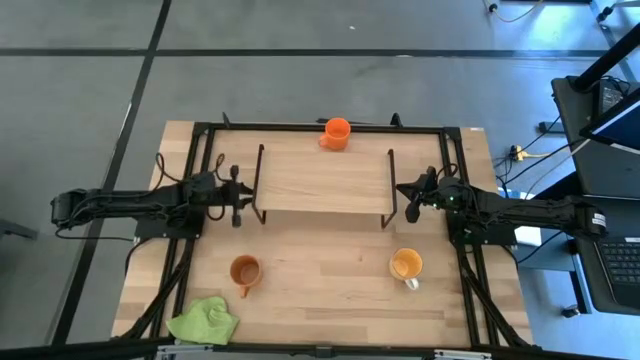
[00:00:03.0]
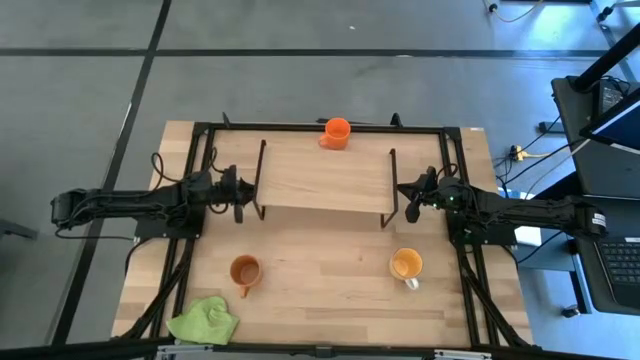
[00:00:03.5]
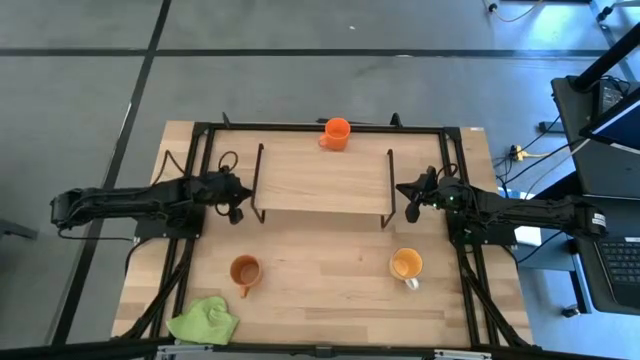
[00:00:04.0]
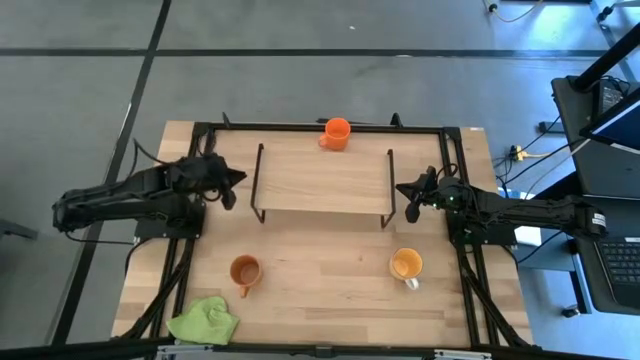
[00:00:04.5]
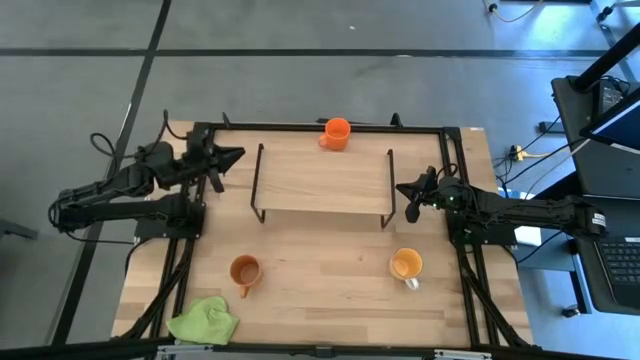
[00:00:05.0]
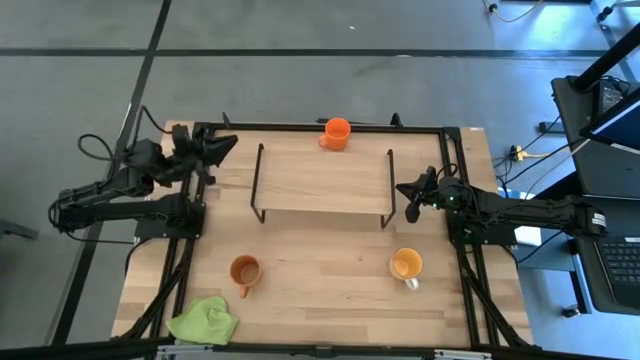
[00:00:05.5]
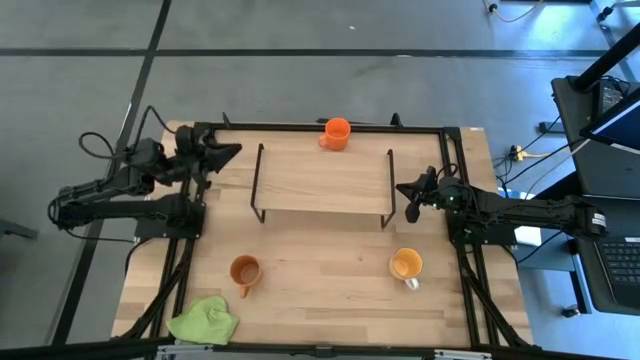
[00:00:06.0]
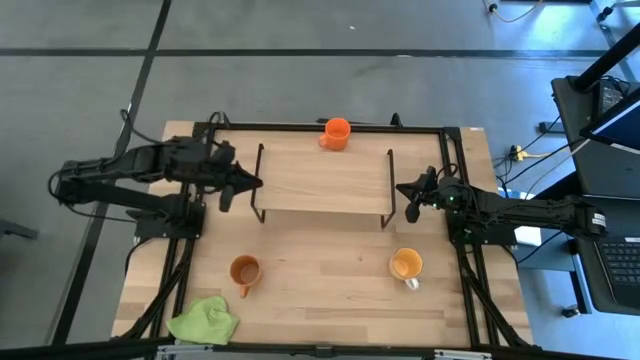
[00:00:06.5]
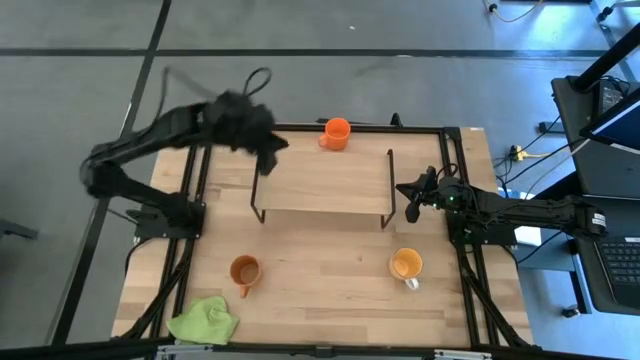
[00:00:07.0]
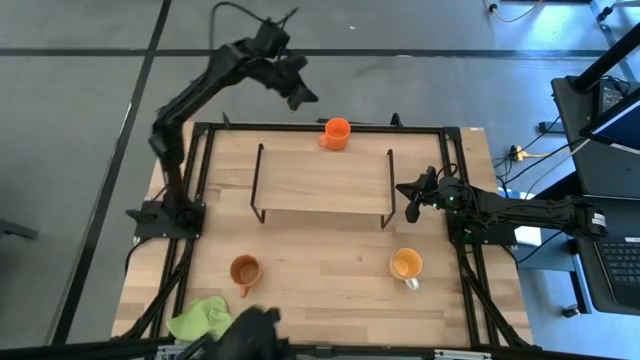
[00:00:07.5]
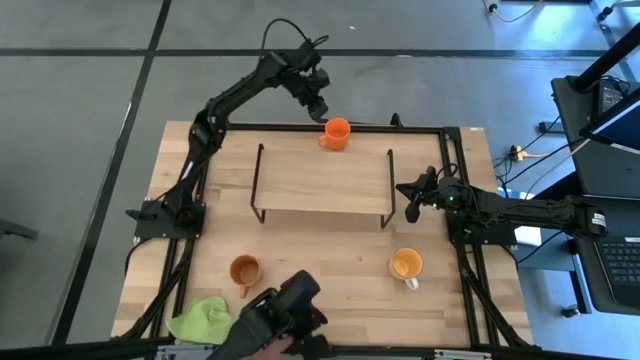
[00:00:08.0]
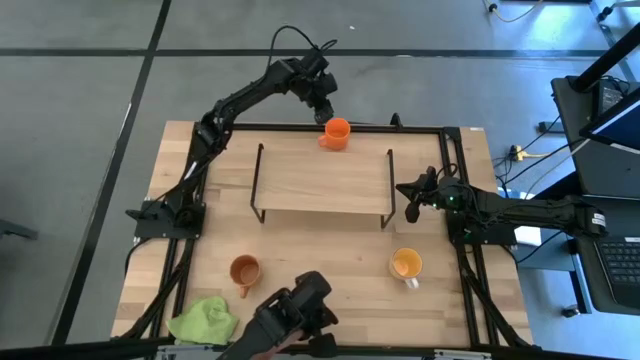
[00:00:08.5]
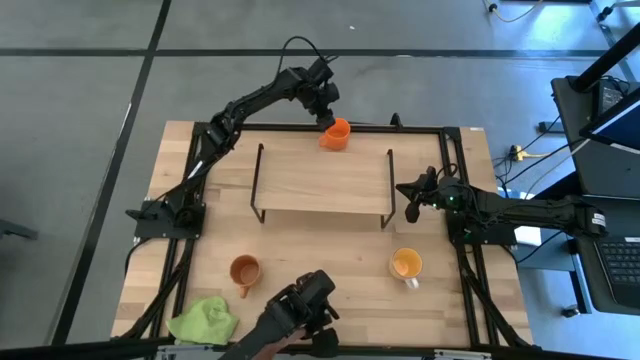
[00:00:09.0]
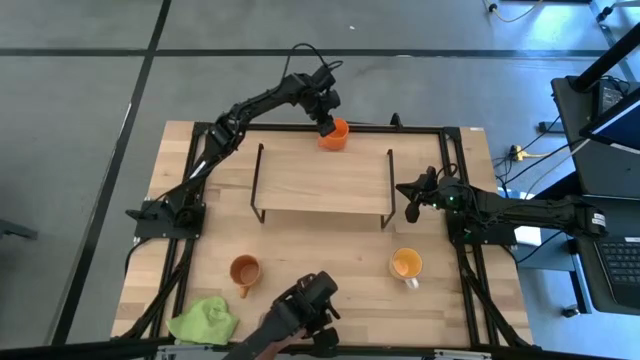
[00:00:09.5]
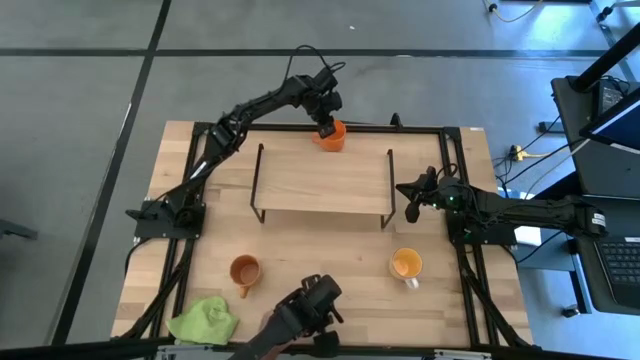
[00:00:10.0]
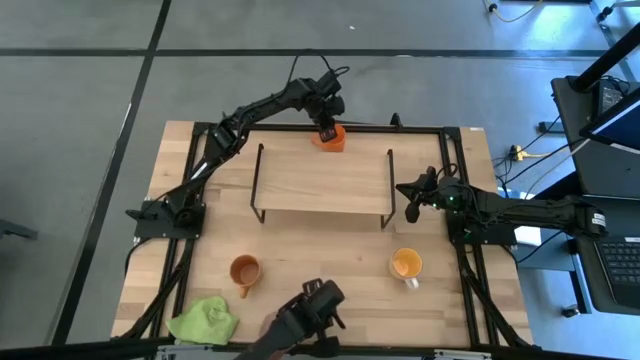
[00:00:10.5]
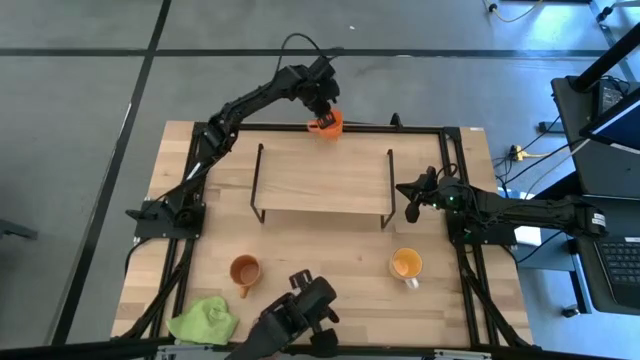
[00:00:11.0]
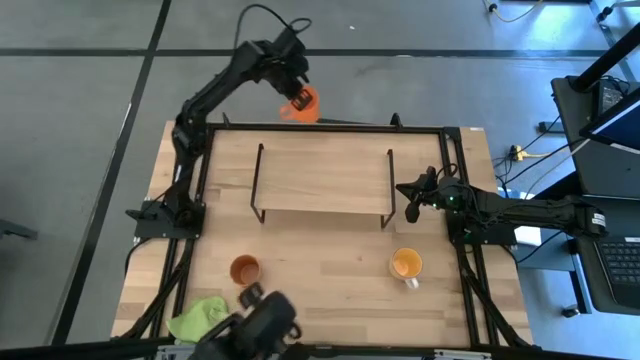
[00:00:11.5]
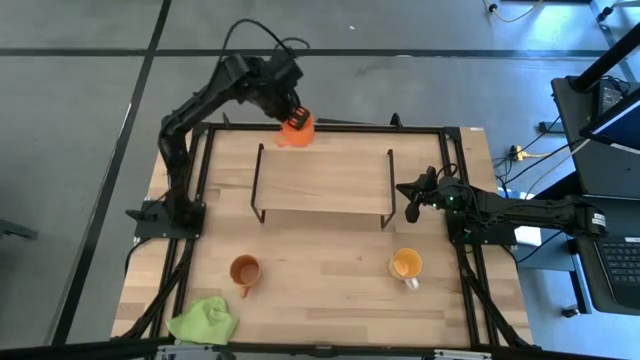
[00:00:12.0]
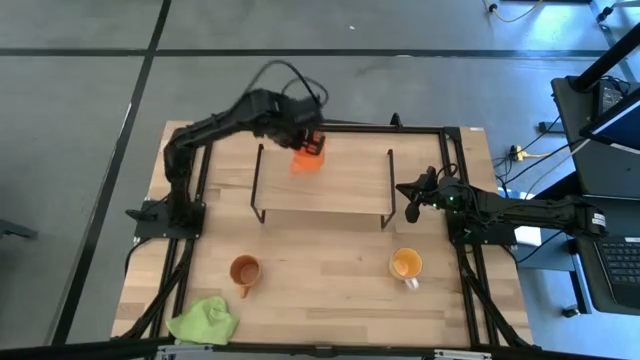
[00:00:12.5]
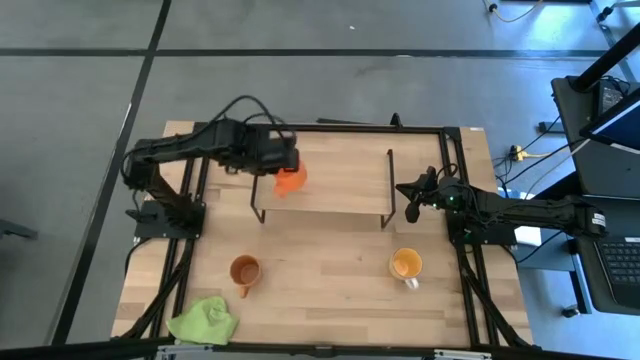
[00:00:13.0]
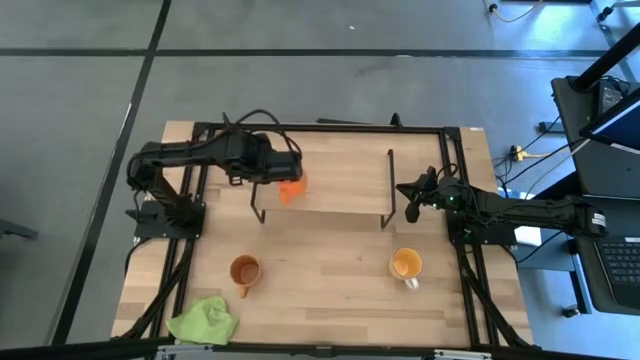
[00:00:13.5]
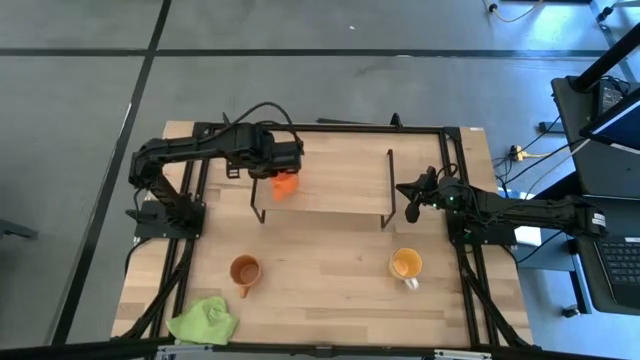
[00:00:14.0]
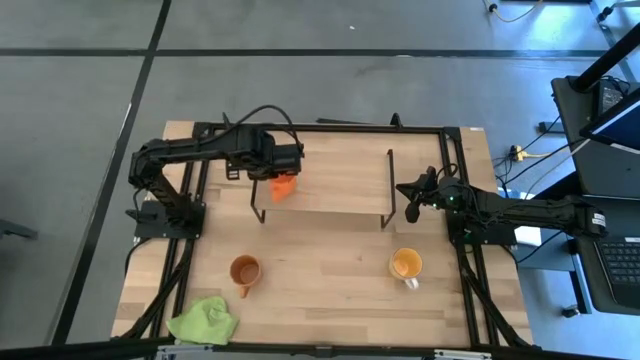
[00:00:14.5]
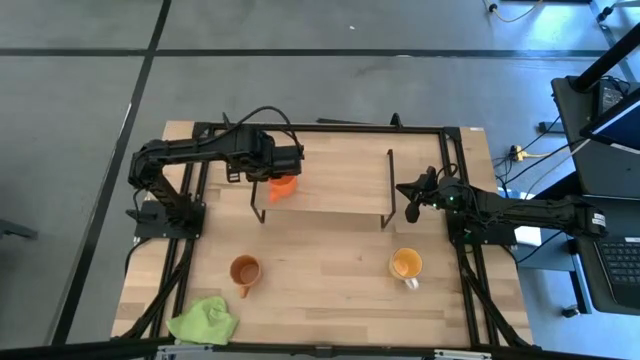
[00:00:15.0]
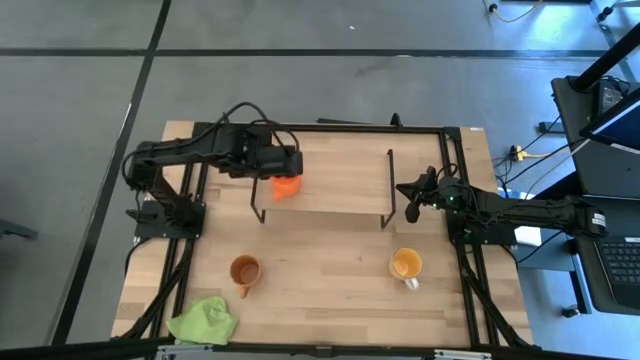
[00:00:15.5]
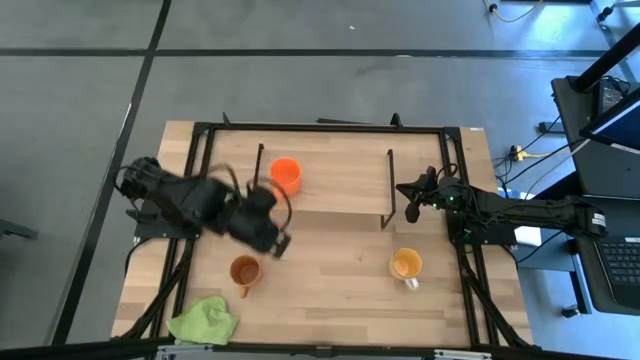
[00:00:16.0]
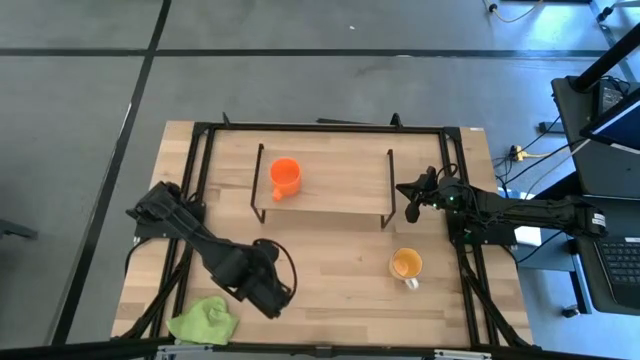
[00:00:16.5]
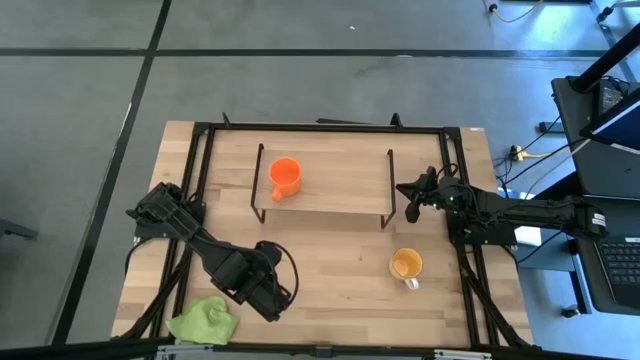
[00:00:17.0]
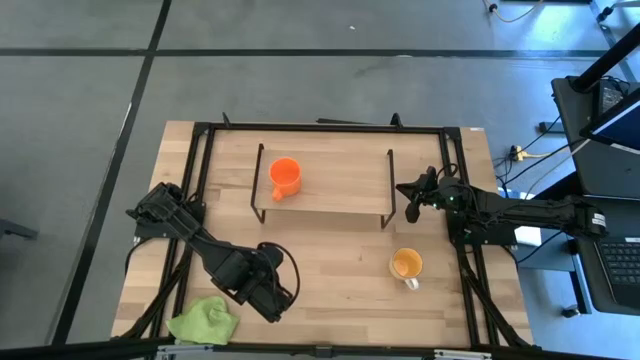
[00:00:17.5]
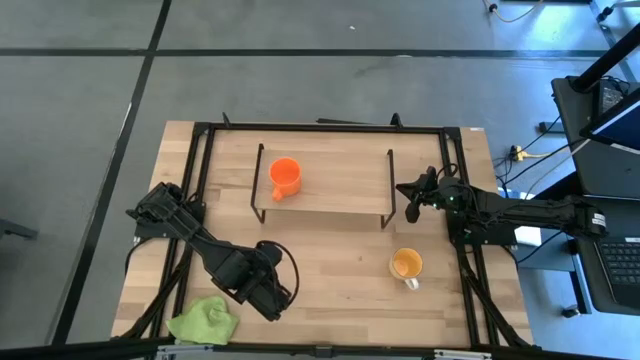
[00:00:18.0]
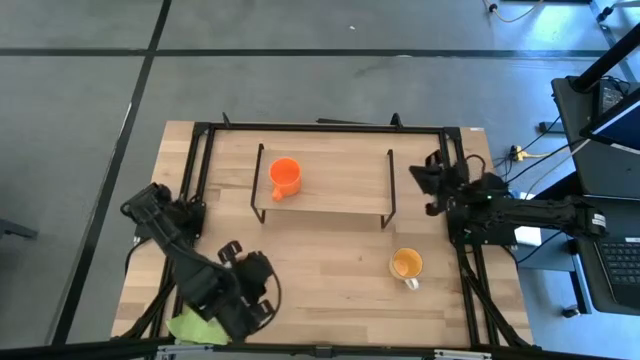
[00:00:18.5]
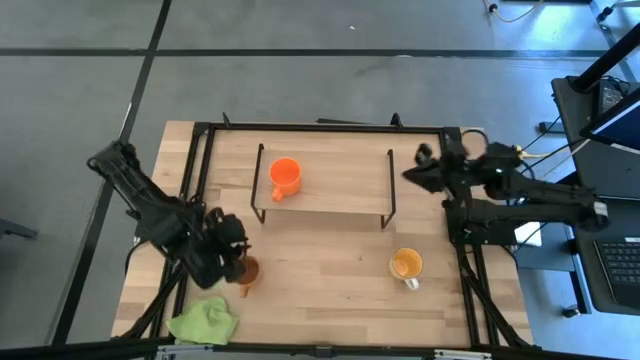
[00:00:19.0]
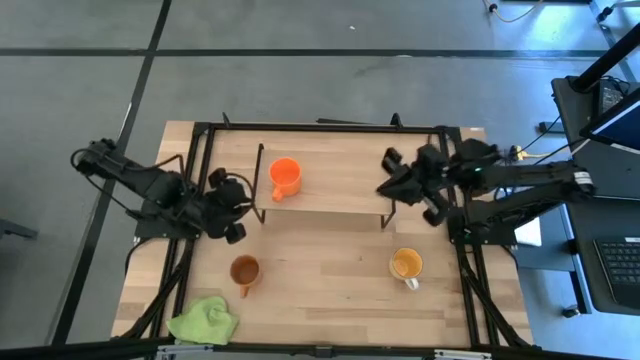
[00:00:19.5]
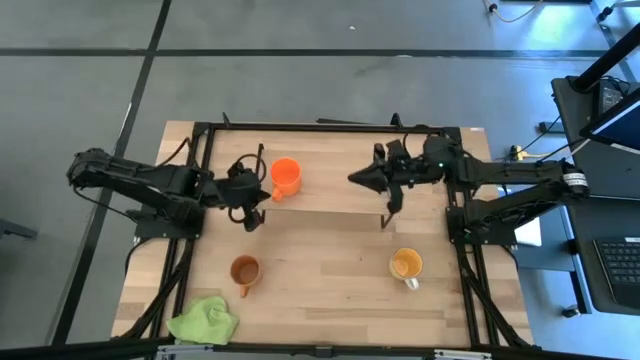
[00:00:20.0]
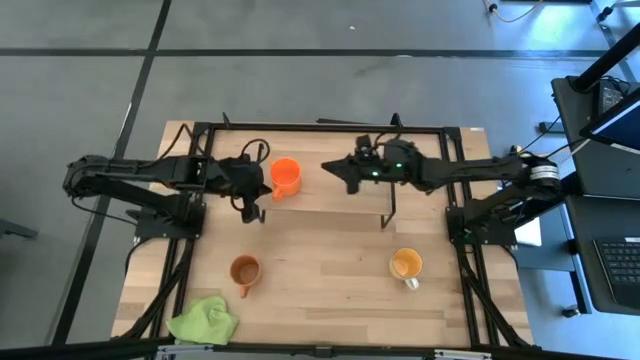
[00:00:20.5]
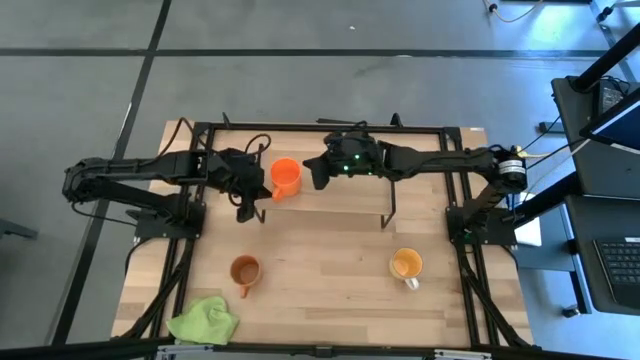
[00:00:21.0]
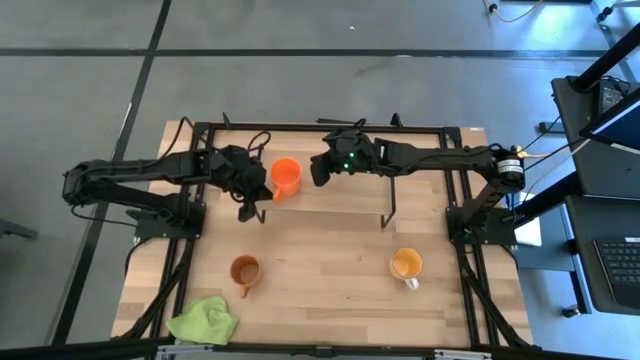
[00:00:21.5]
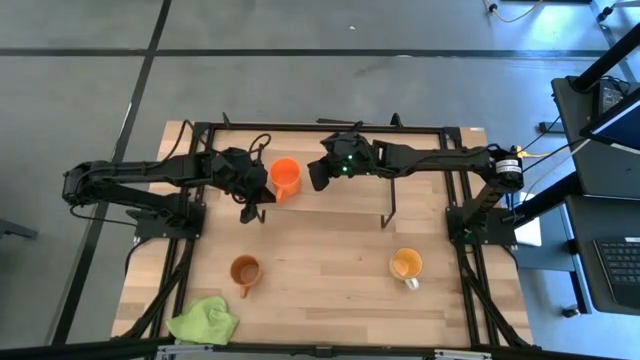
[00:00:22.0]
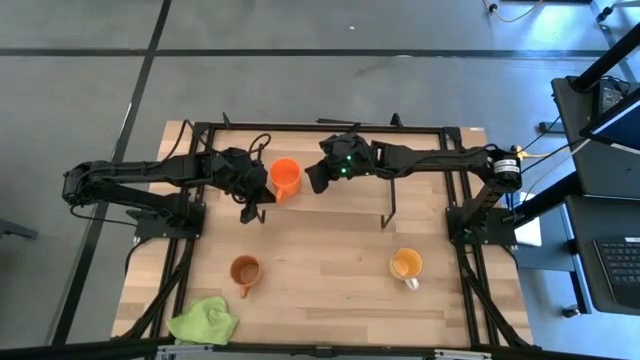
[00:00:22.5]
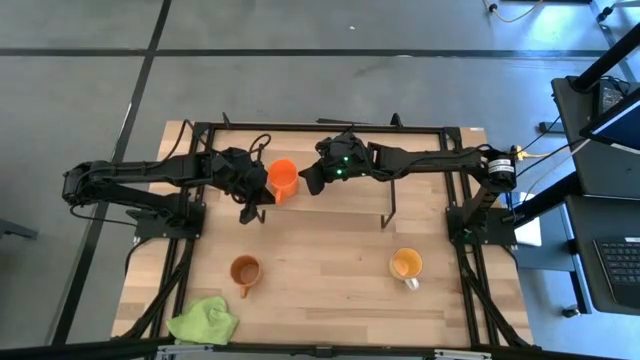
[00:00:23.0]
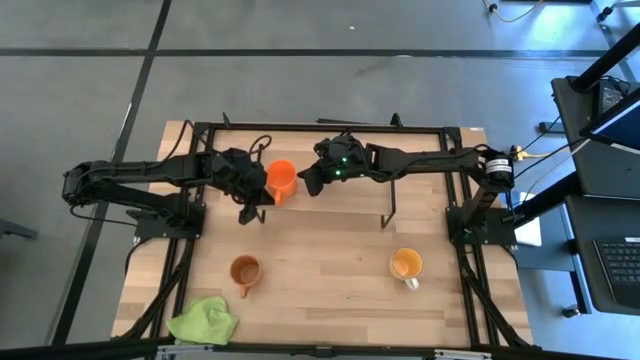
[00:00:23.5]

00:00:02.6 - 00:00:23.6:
Task: Stack small to large cups/mugs on shelf
Put the orange cup on the shelf
